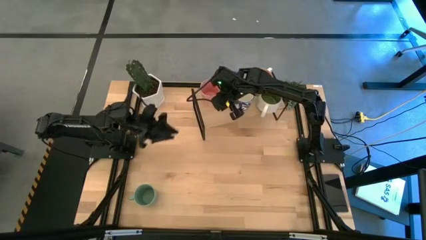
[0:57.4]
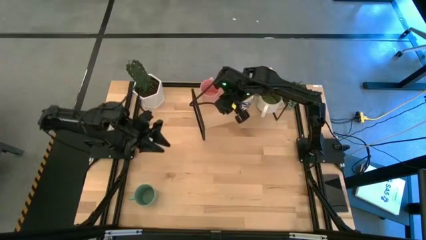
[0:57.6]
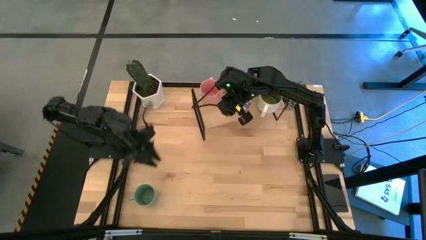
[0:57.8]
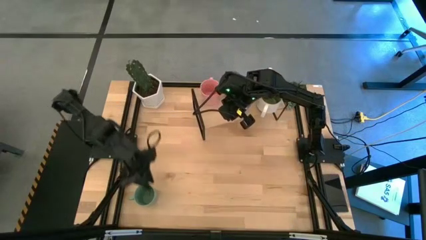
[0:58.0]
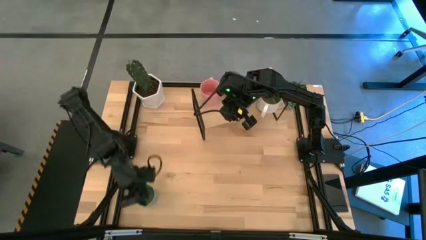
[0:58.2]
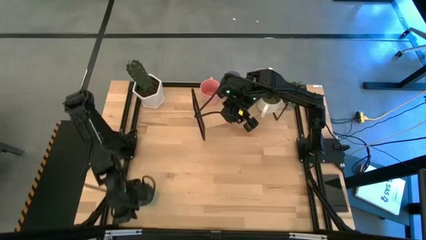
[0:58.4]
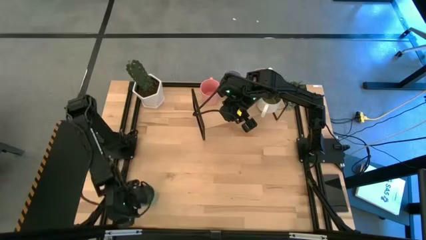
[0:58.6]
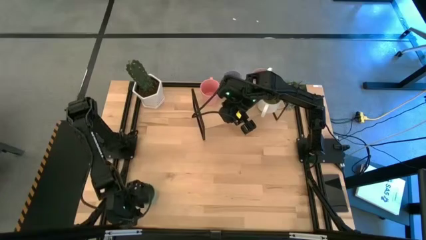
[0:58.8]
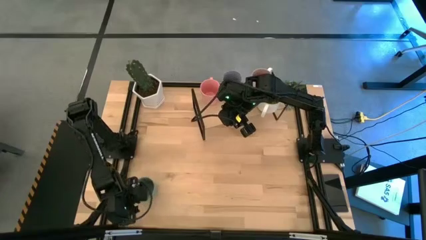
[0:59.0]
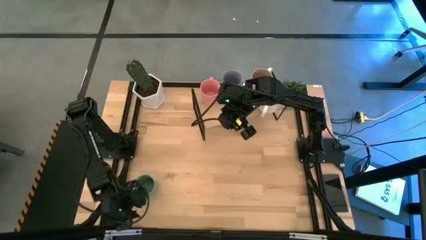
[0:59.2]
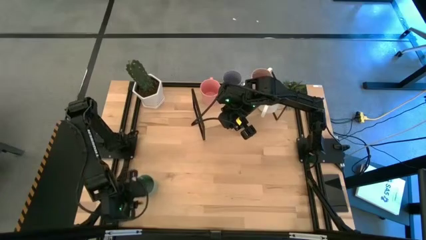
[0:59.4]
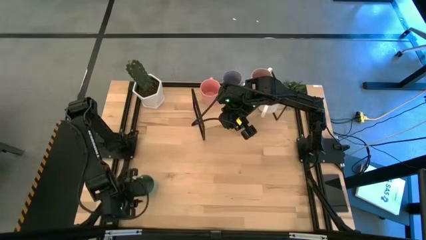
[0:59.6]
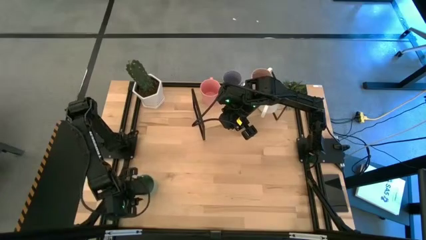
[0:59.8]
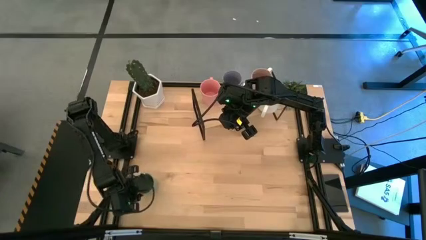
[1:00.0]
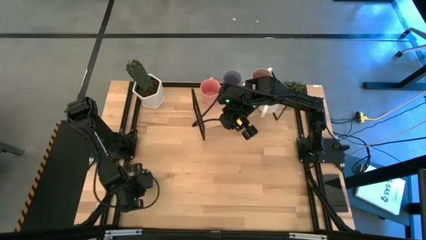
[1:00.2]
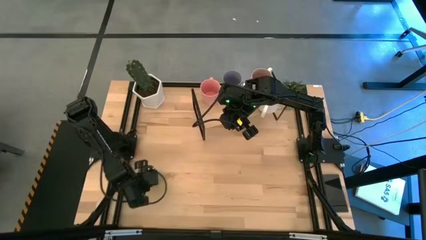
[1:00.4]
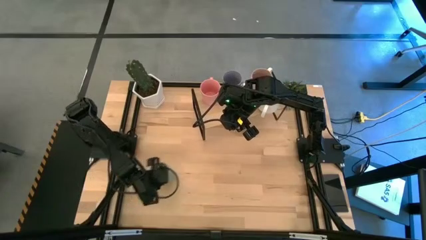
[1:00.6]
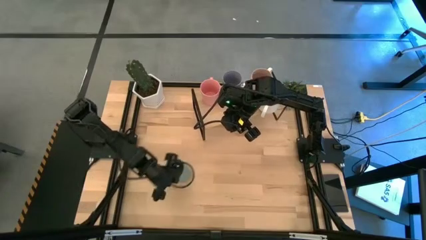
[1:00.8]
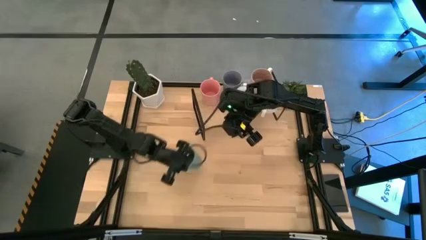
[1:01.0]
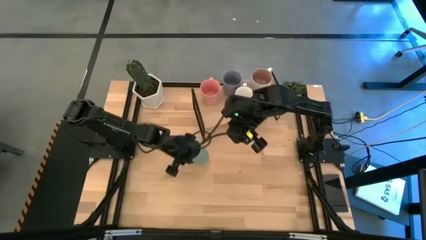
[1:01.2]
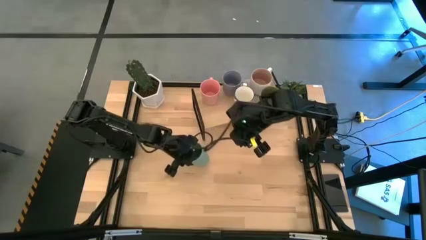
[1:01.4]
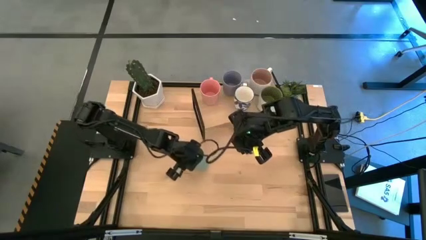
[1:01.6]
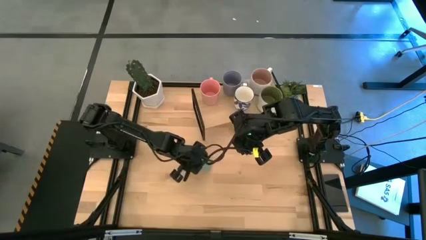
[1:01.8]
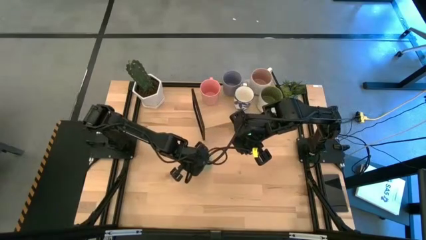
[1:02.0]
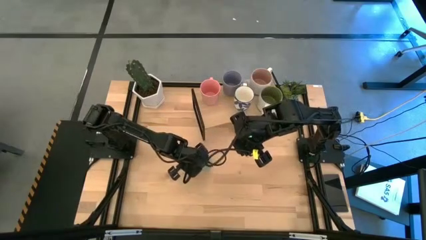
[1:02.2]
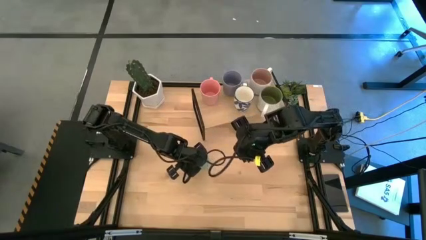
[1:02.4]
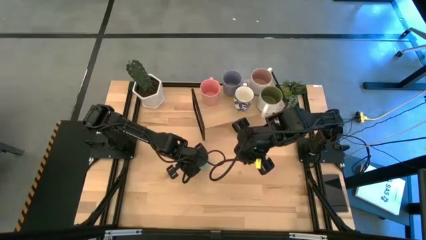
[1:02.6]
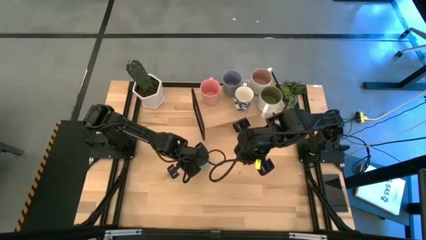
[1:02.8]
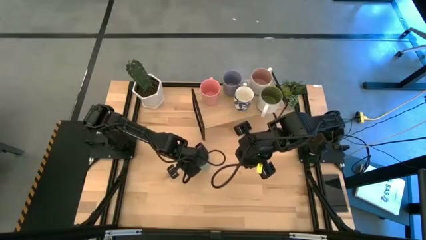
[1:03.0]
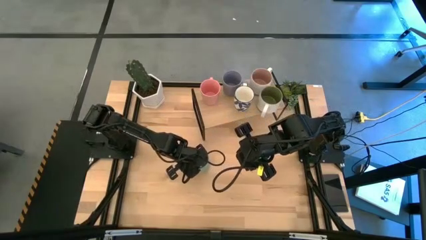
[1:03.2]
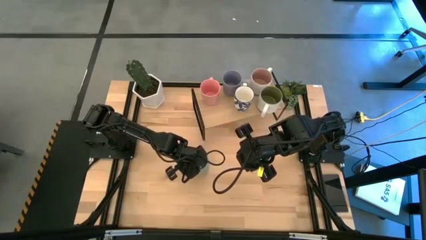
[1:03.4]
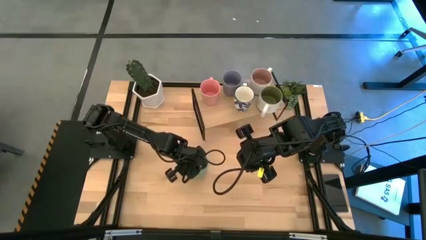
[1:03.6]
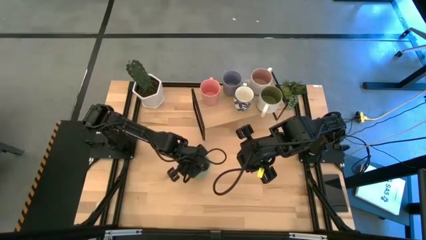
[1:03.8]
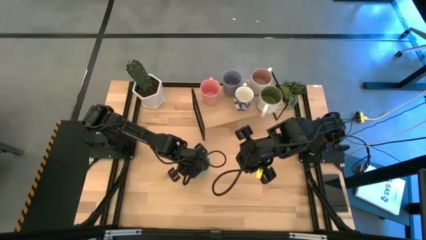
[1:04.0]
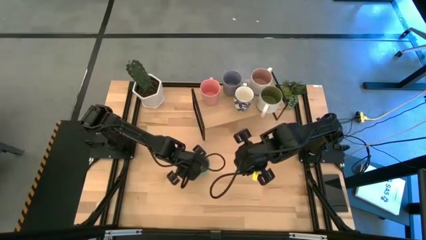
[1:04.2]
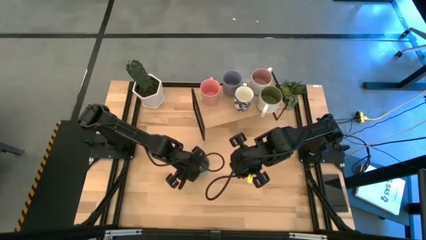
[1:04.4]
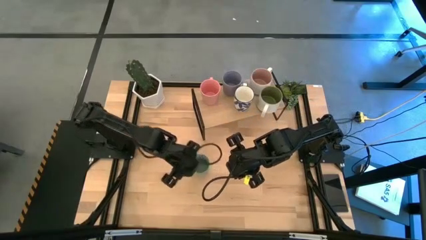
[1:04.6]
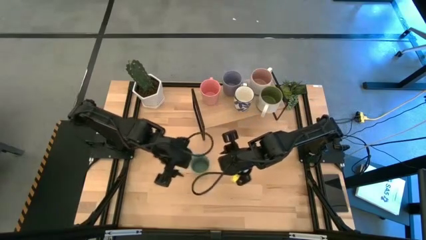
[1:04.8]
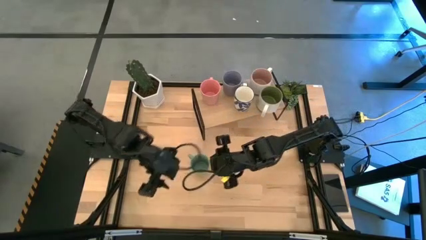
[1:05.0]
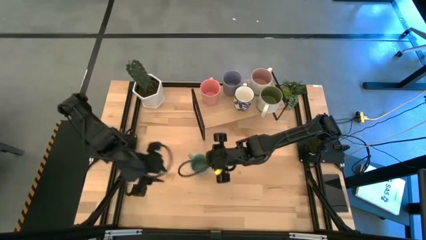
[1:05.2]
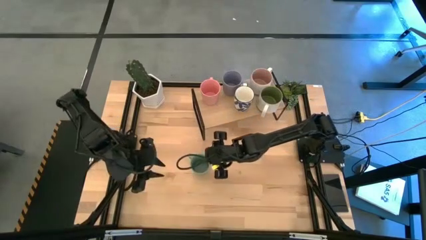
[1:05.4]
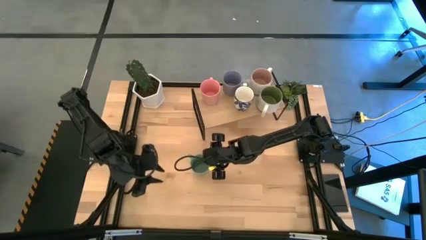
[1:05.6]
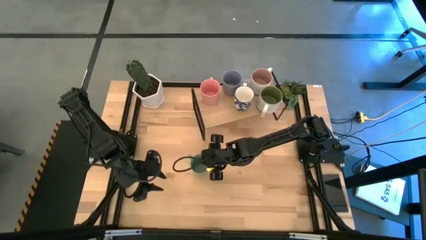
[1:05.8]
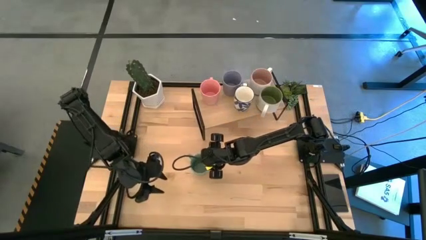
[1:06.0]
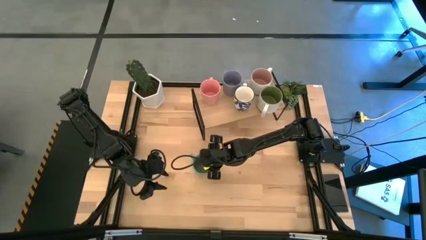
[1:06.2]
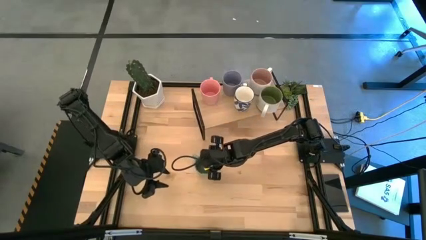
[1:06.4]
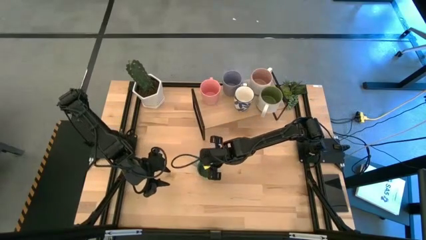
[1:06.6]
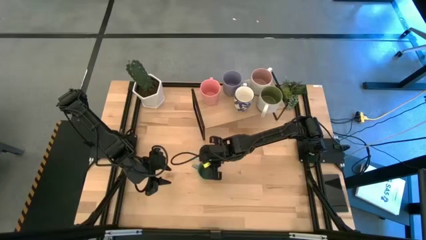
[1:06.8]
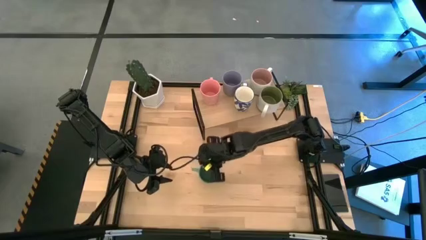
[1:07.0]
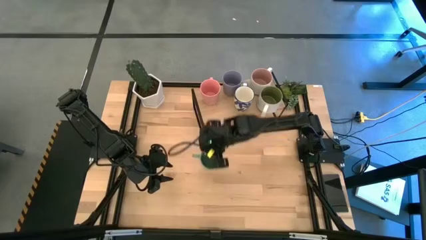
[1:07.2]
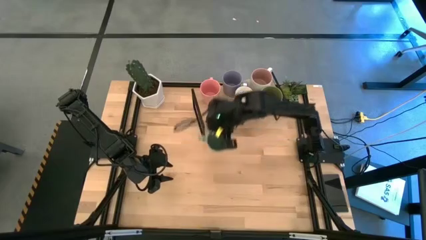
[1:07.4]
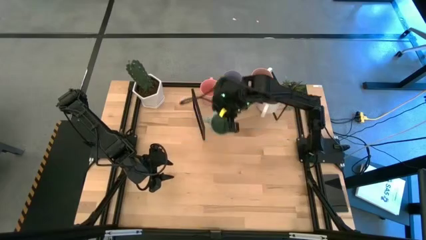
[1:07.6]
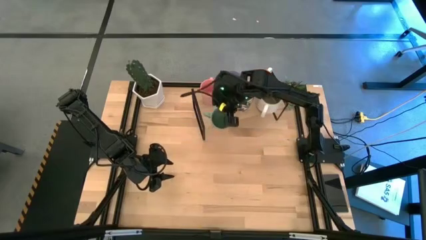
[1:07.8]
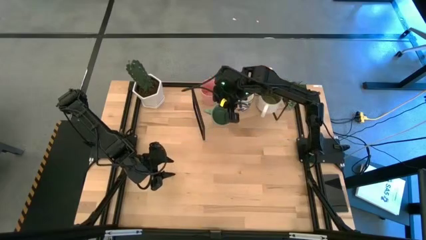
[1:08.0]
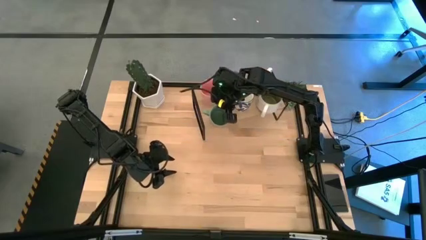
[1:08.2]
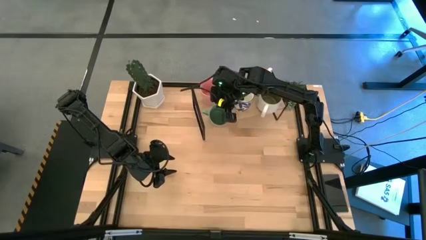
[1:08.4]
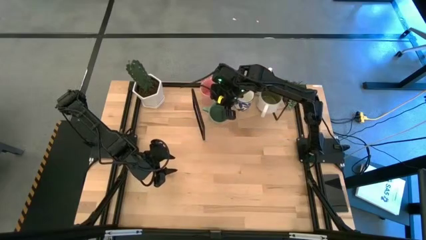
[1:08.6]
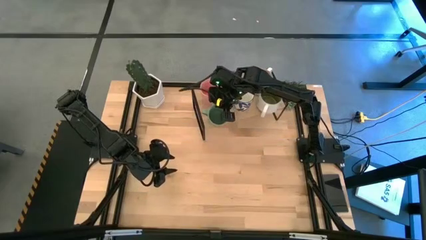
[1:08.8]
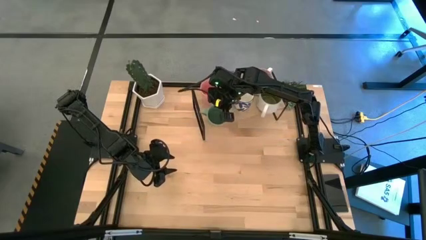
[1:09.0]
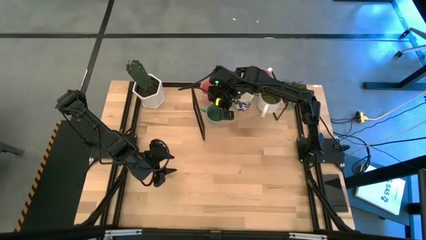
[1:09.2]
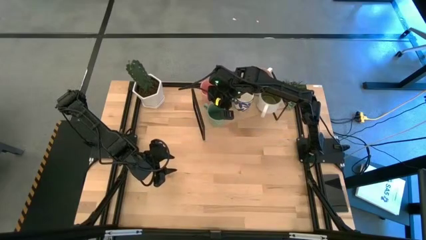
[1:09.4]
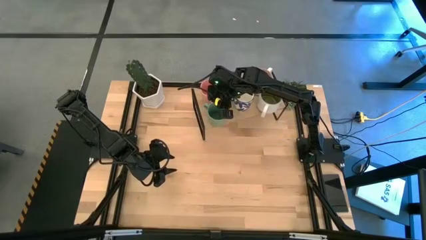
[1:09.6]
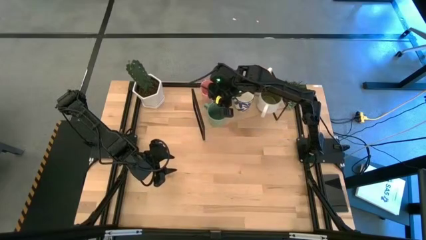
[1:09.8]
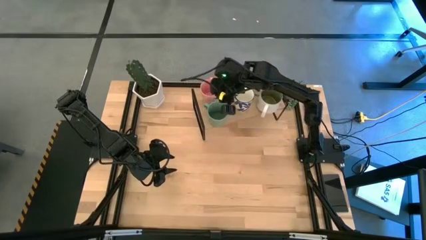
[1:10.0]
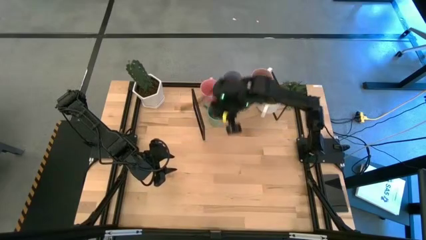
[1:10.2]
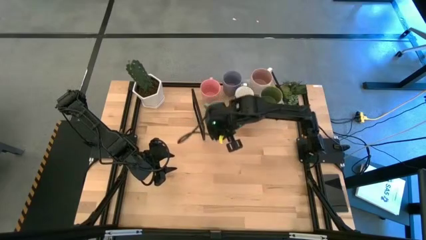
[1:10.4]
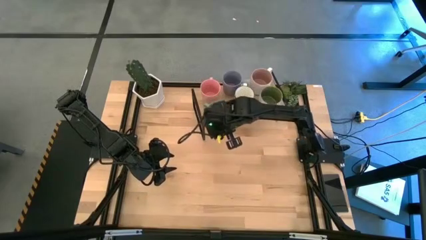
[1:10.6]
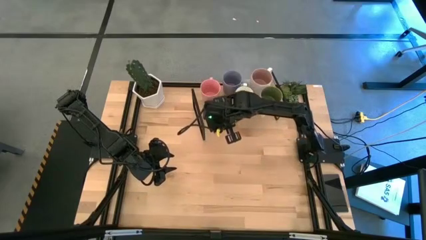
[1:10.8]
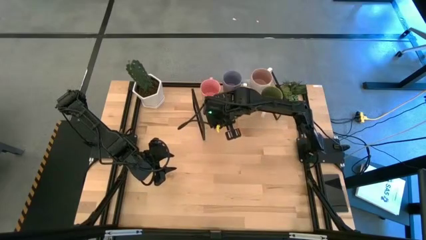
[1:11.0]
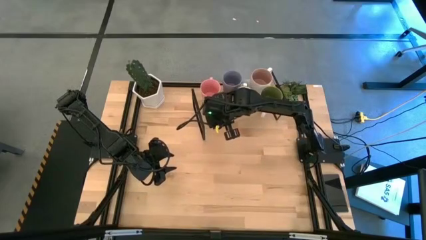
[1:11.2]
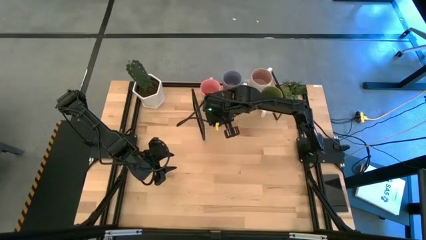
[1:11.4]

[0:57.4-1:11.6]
Task: Place coffee mugs
Put the green mug on the shelf
